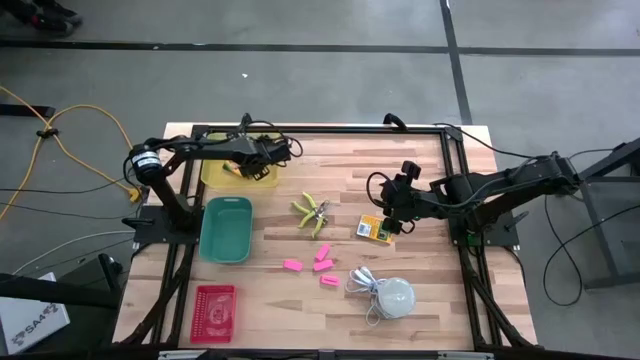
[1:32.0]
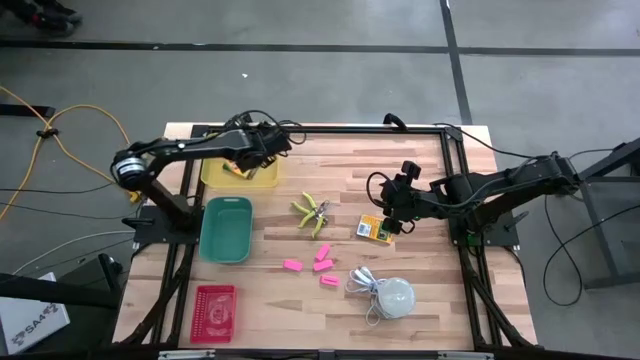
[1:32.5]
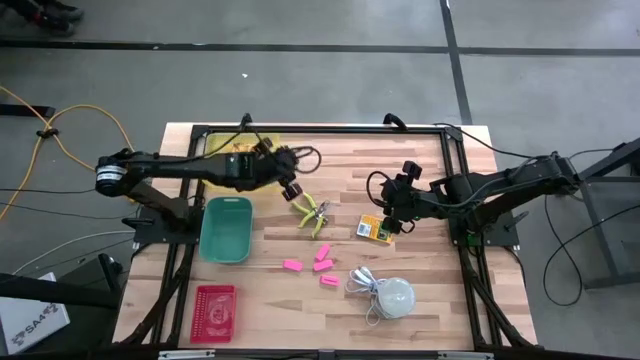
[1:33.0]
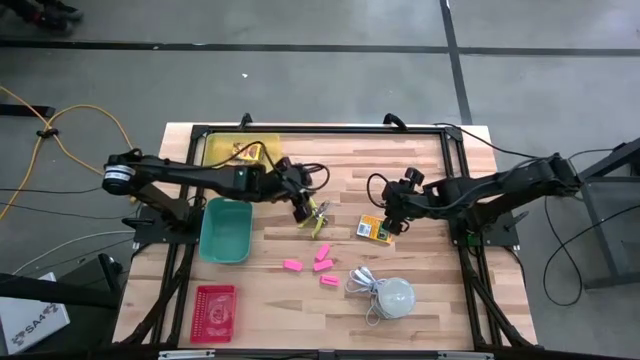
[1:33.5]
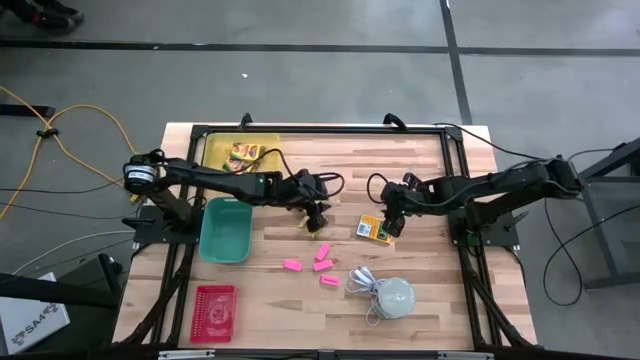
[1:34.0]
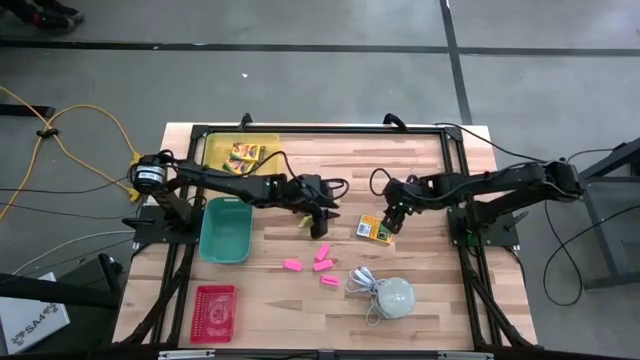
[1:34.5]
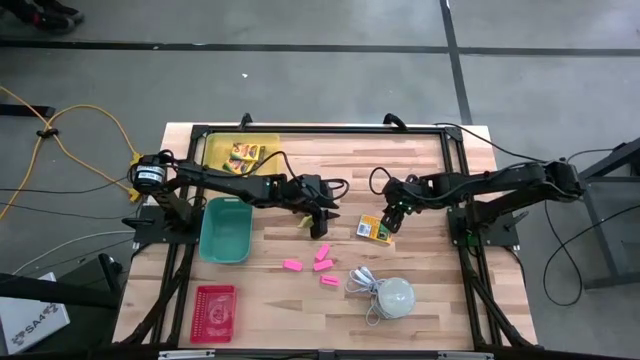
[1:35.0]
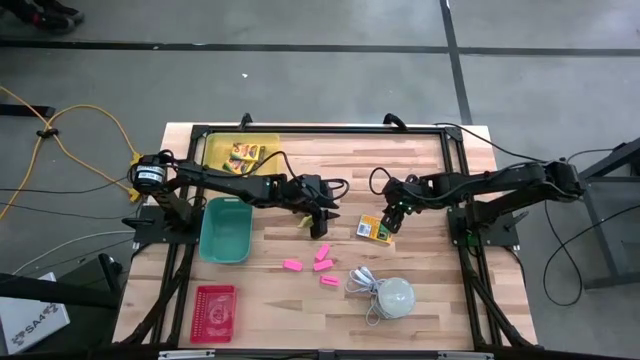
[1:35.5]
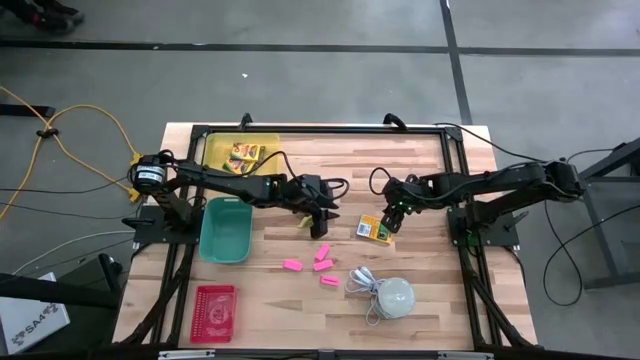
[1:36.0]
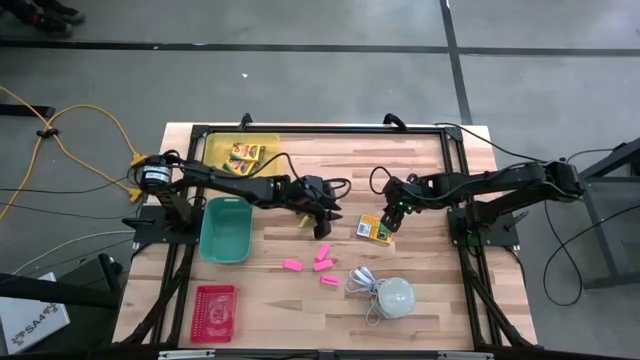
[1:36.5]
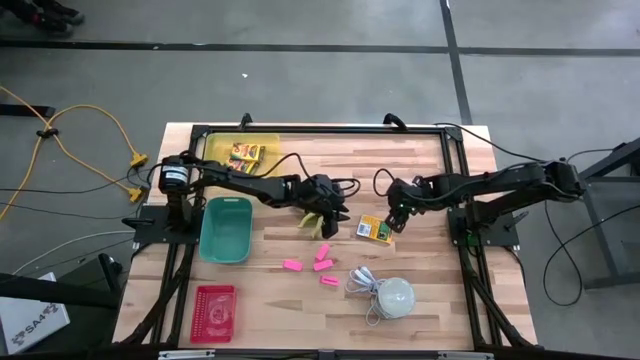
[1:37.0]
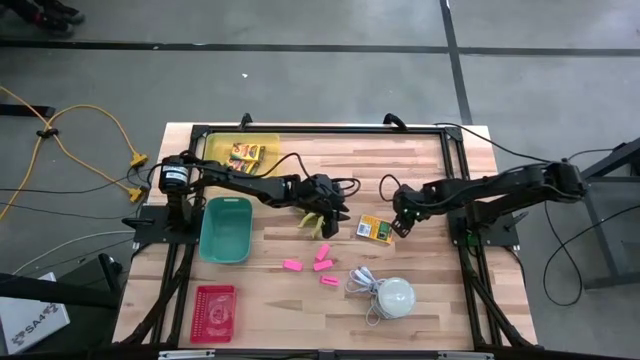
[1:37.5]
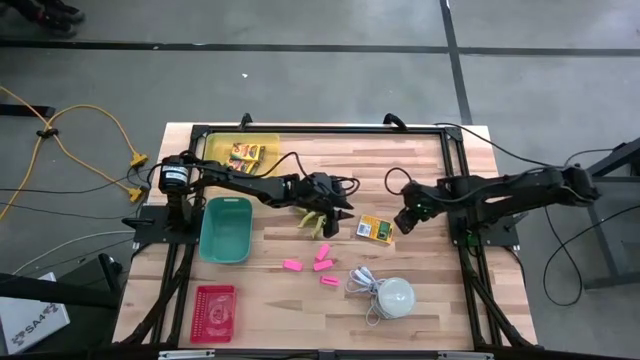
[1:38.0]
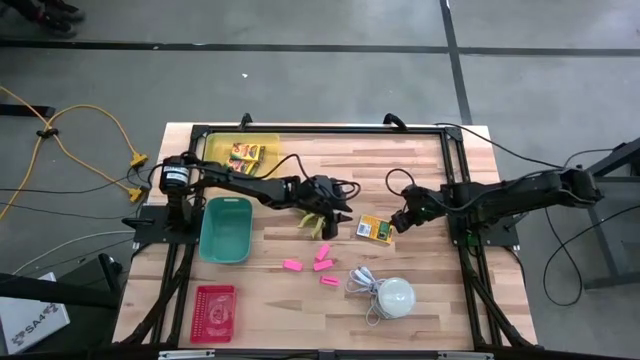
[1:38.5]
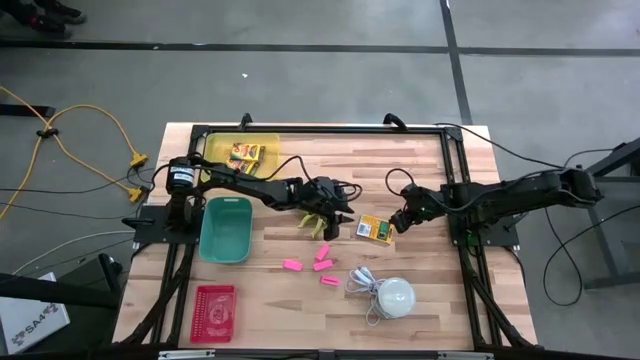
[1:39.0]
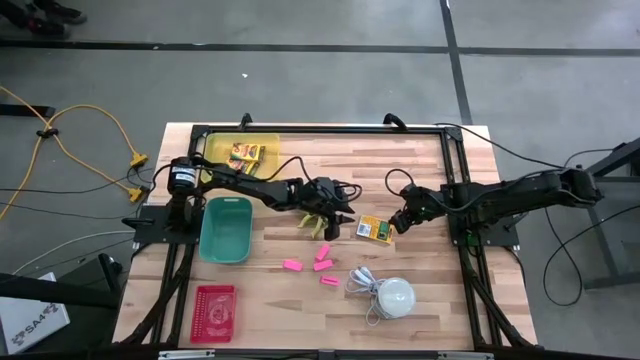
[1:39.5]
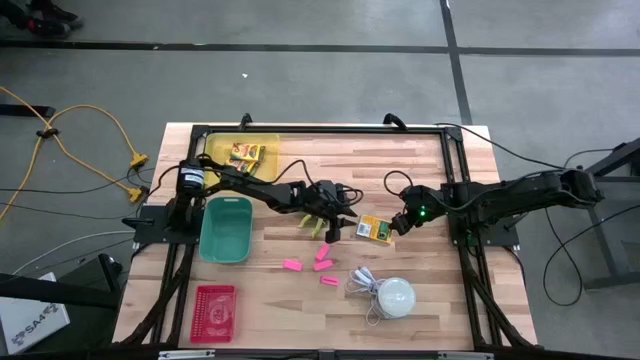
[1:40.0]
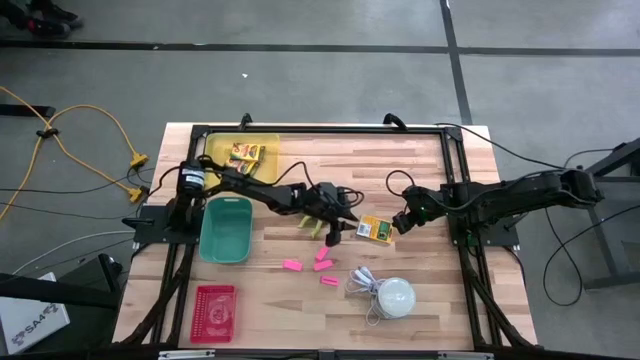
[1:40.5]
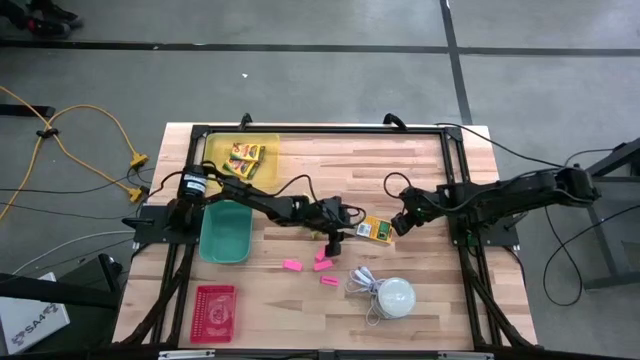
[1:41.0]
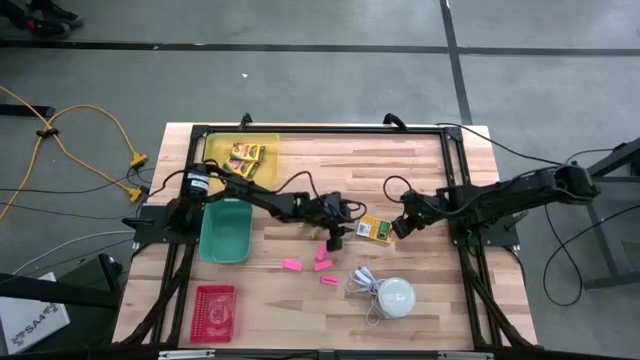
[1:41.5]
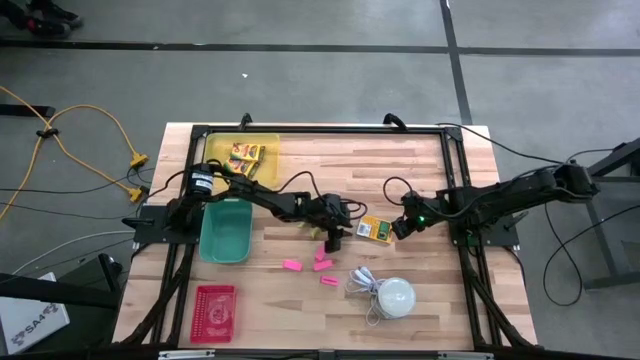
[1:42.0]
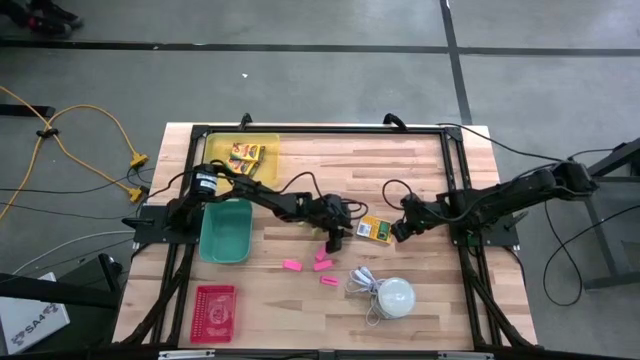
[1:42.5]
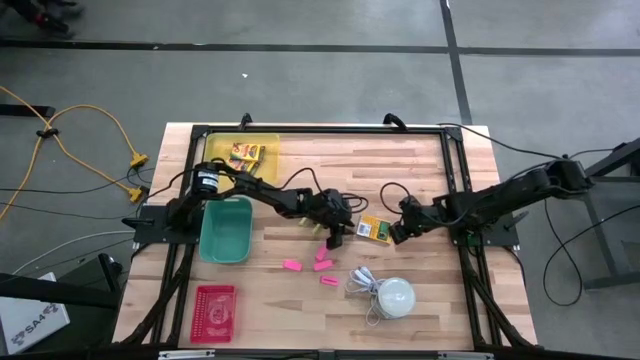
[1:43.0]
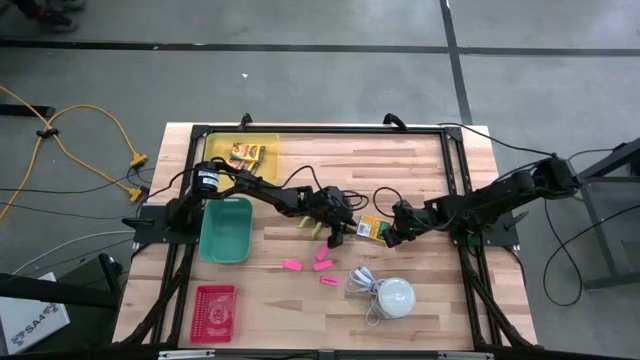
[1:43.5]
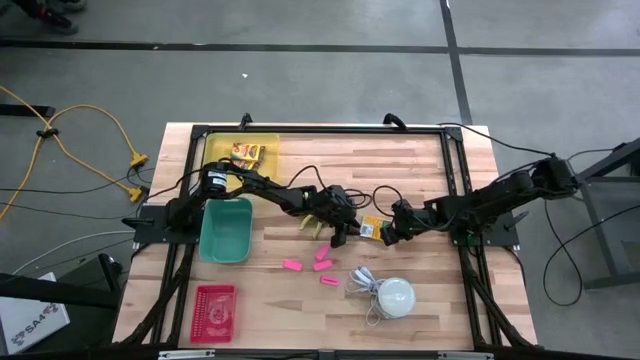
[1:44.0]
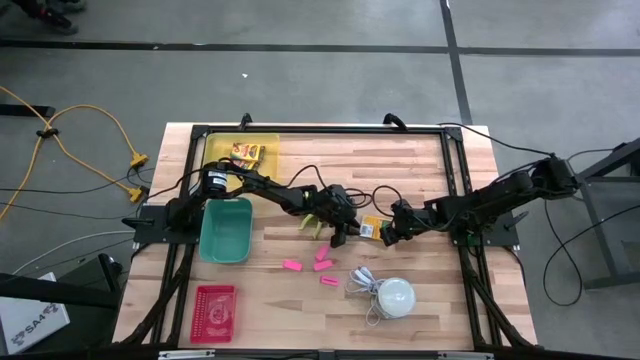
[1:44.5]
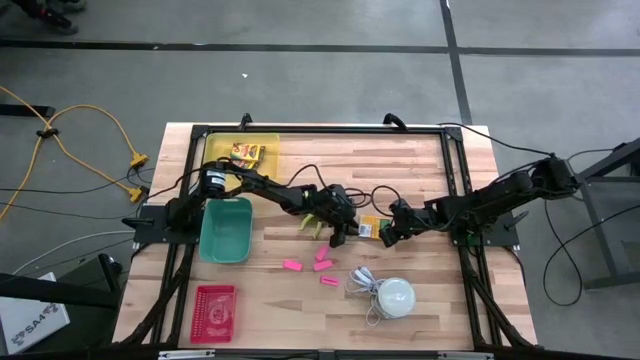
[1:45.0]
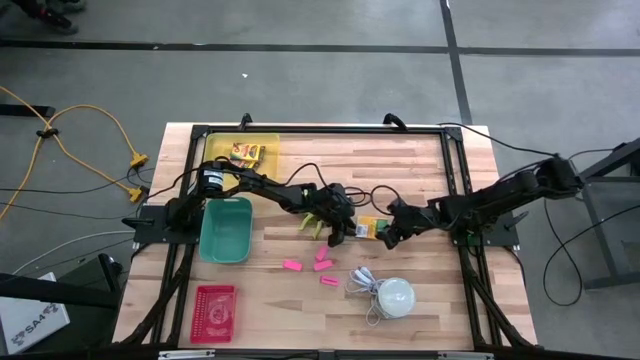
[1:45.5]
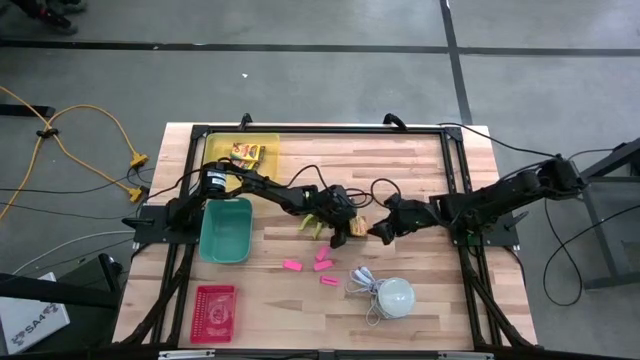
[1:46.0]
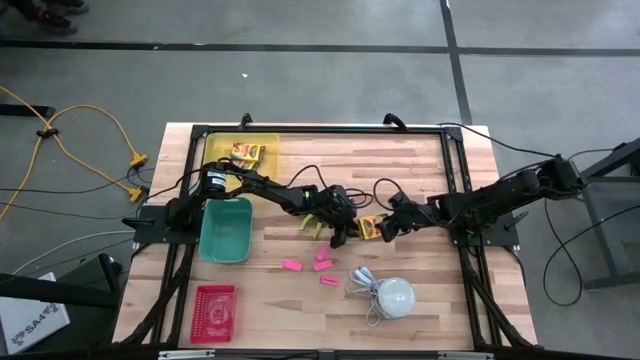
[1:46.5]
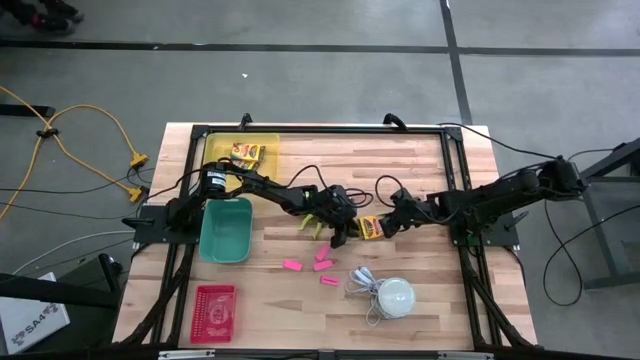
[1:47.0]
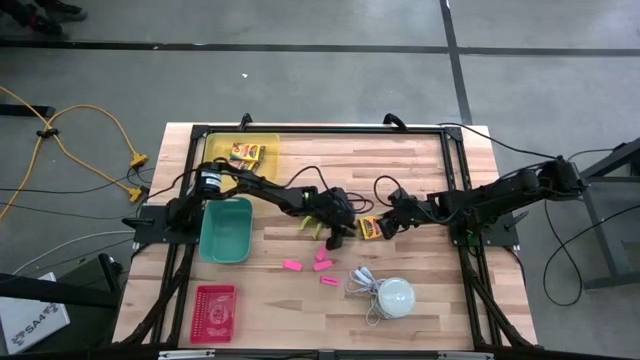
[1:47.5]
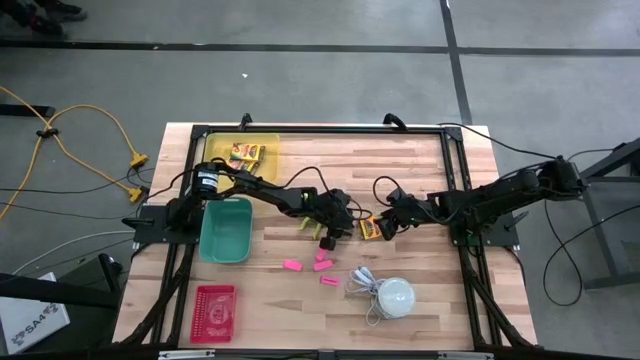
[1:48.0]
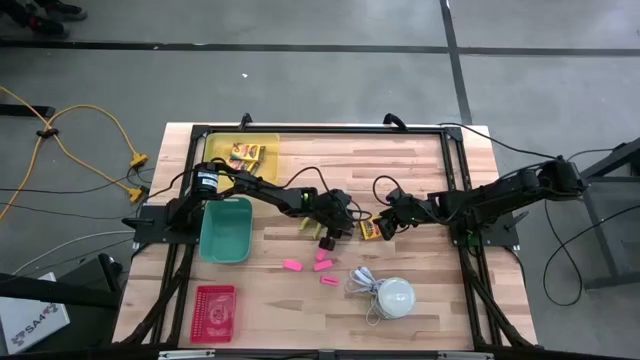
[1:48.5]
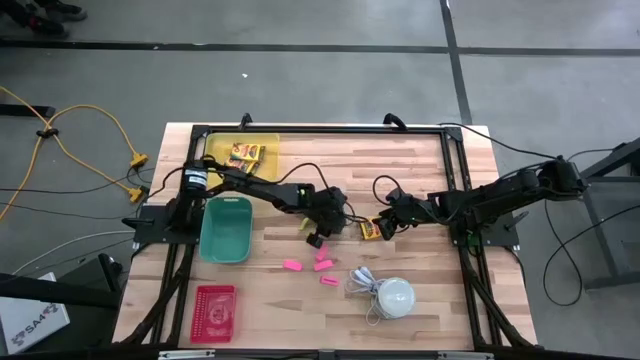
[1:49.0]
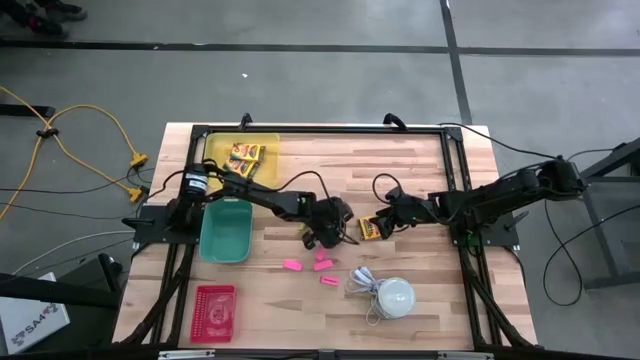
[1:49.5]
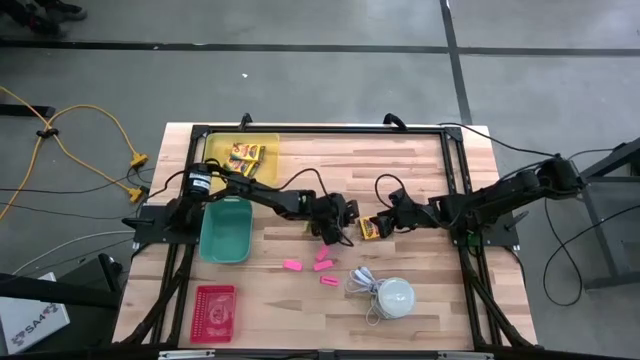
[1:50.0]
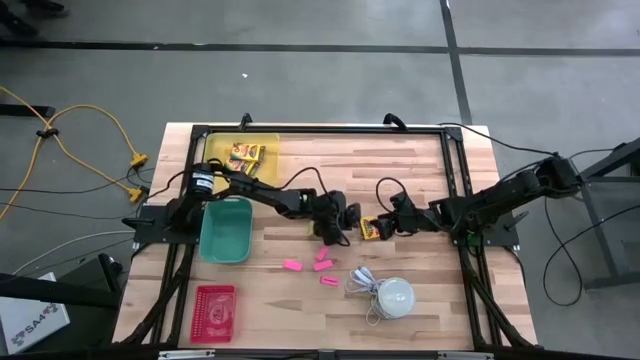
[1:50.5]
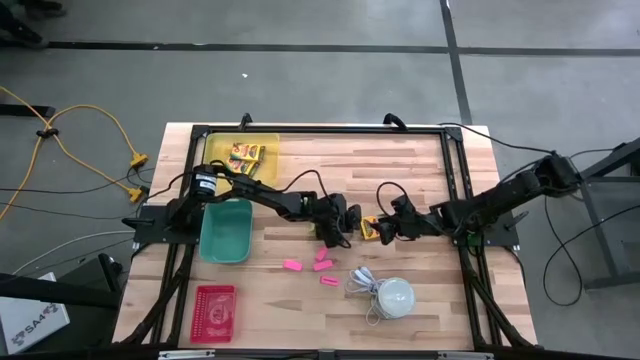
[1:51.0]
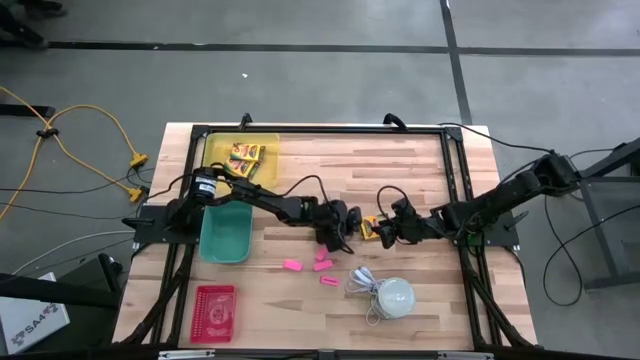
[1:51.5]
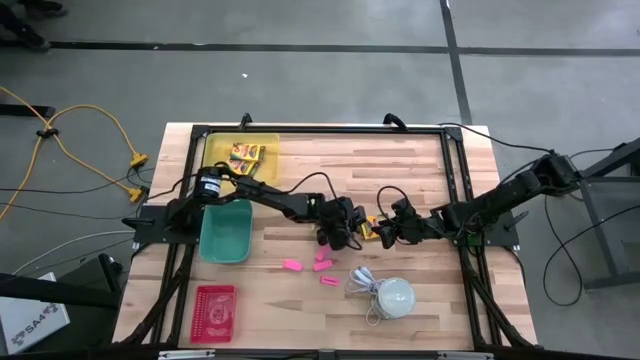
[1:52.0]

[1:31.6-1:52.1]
Task: Pick & Place School Supplies
Put the yellow crayon box into the yellow bin

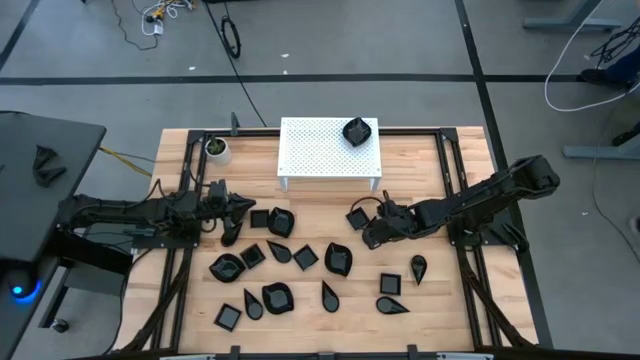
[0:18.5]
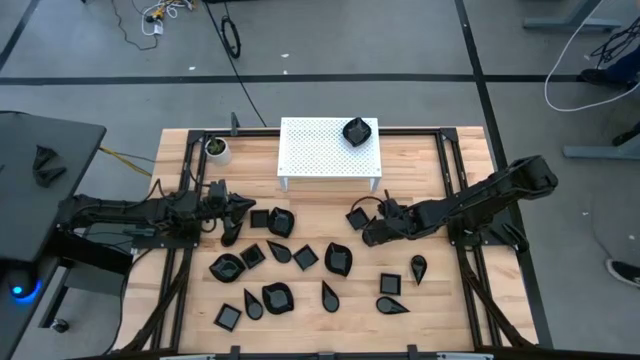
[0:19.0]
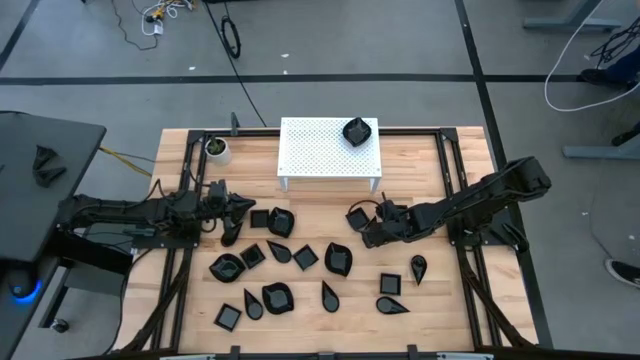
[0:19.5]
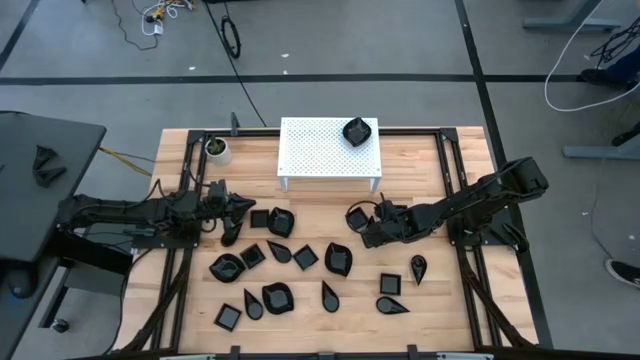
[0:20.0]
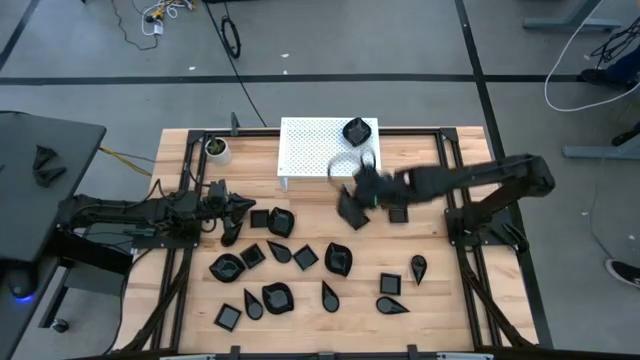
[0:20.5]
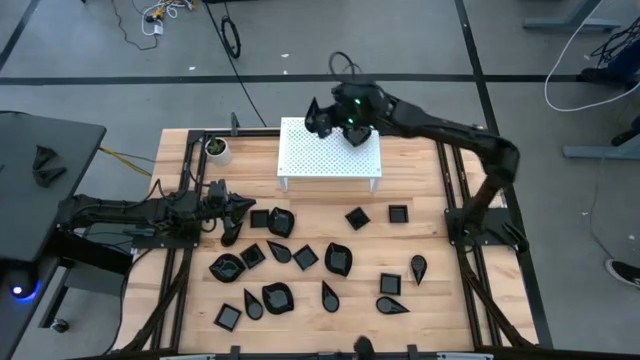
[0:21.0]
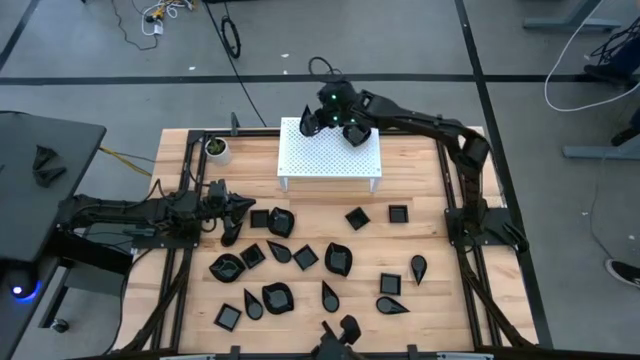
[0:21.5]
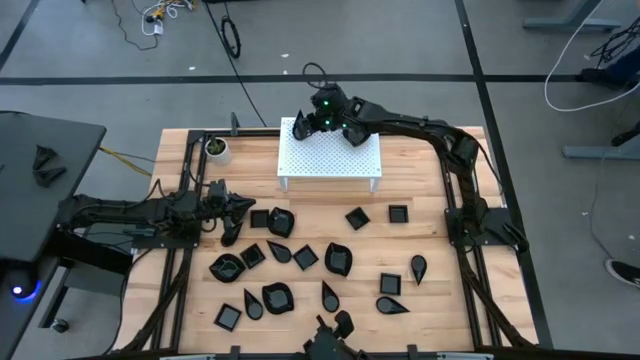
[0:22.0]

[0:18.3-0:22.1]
Task: Pick & Place Mini shaped plates
Put the black drop-shaped plate on the shelf
